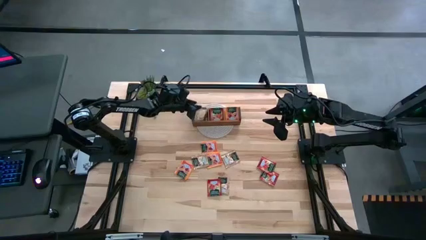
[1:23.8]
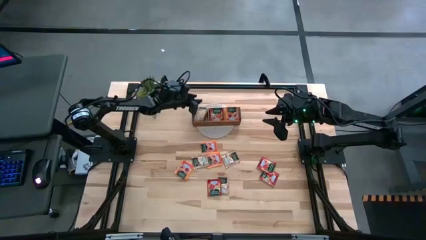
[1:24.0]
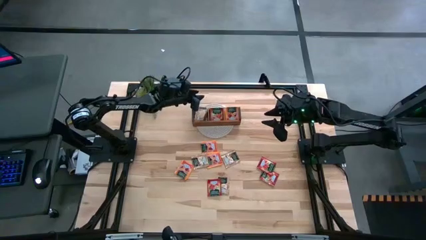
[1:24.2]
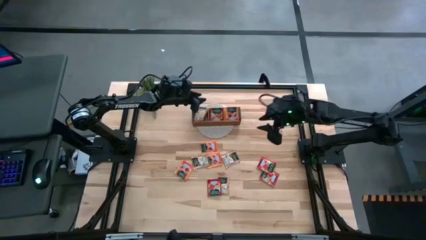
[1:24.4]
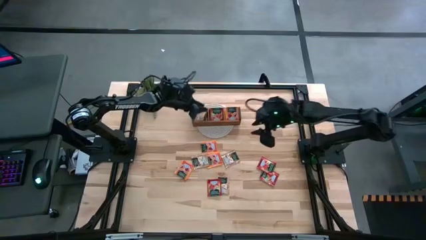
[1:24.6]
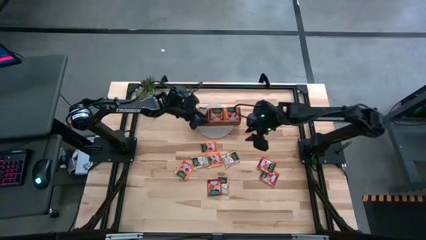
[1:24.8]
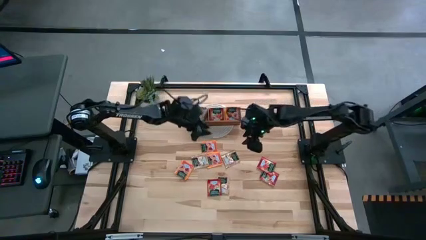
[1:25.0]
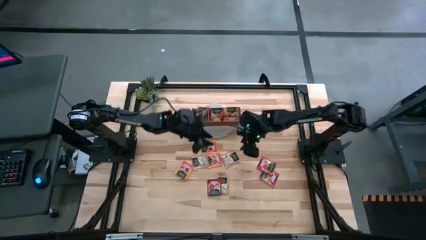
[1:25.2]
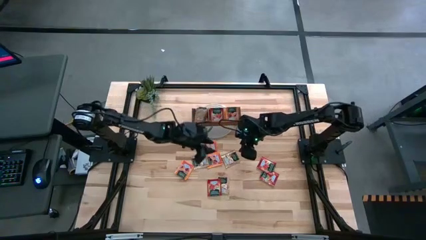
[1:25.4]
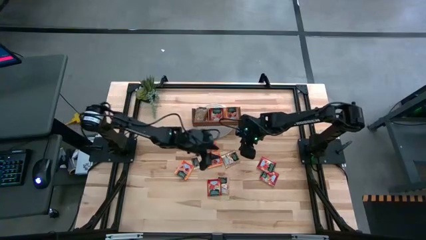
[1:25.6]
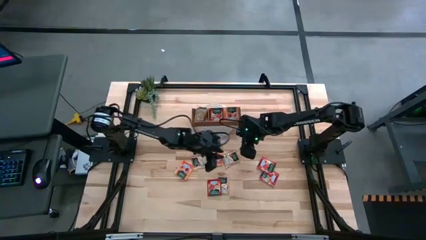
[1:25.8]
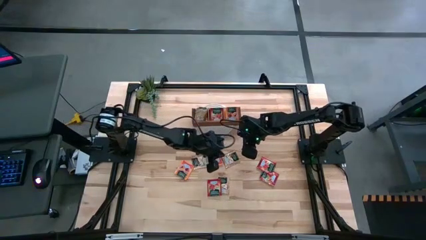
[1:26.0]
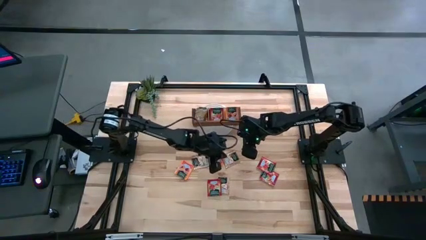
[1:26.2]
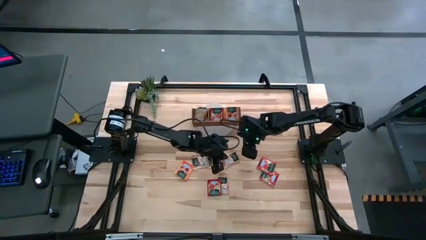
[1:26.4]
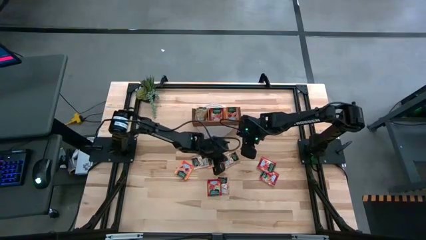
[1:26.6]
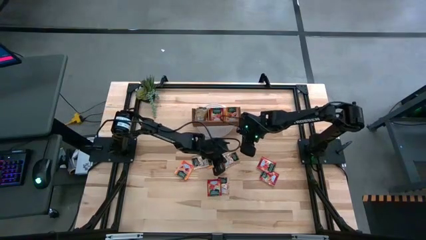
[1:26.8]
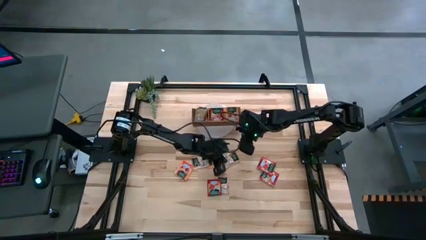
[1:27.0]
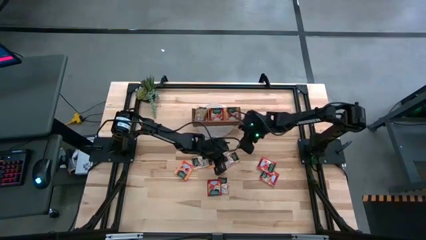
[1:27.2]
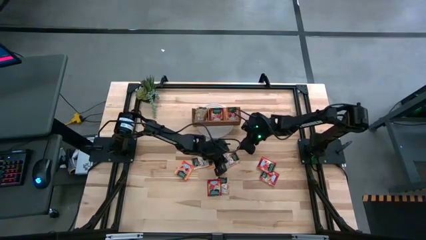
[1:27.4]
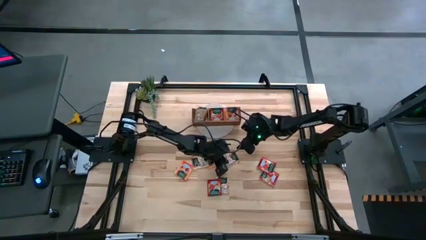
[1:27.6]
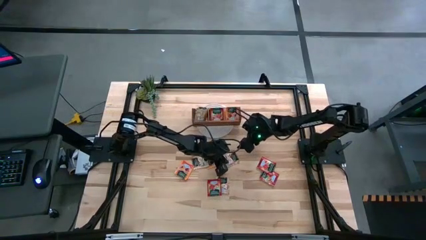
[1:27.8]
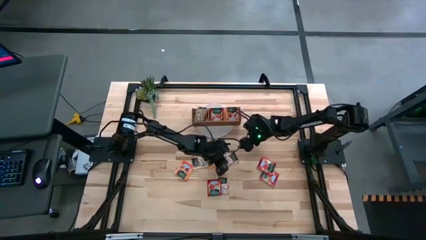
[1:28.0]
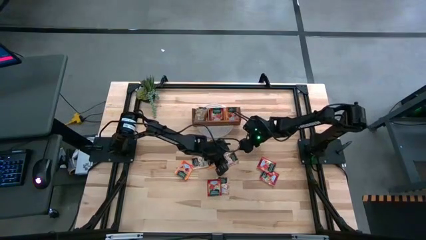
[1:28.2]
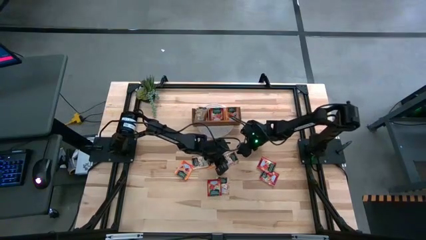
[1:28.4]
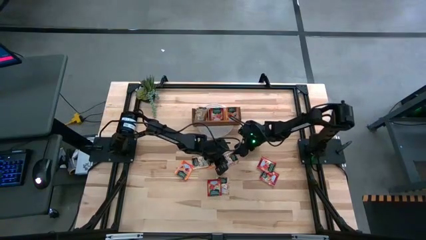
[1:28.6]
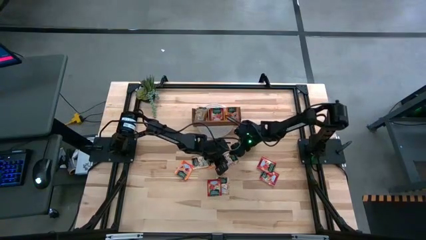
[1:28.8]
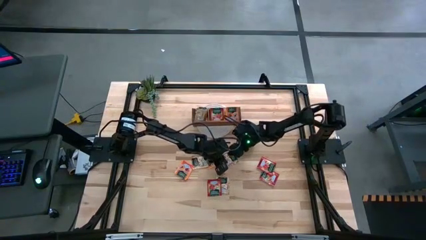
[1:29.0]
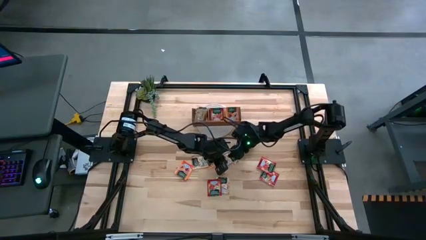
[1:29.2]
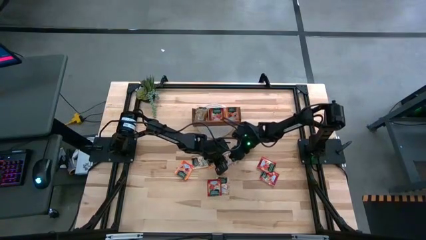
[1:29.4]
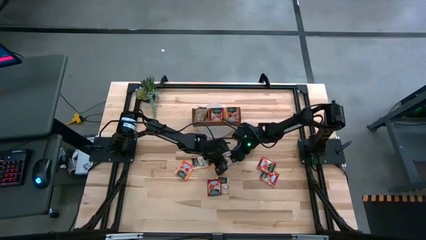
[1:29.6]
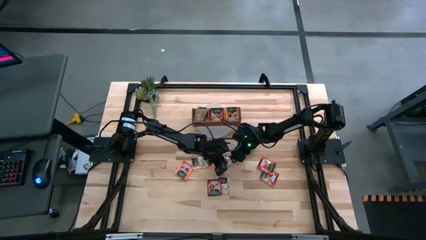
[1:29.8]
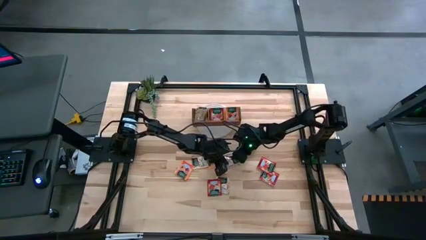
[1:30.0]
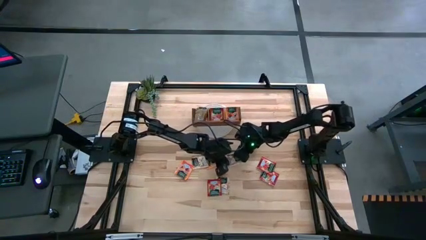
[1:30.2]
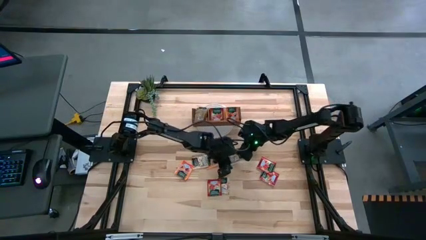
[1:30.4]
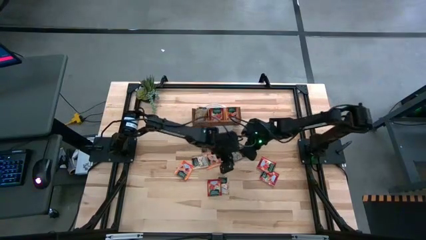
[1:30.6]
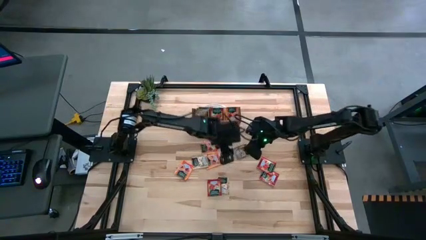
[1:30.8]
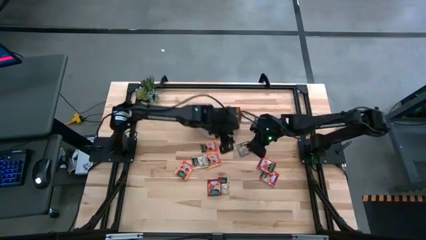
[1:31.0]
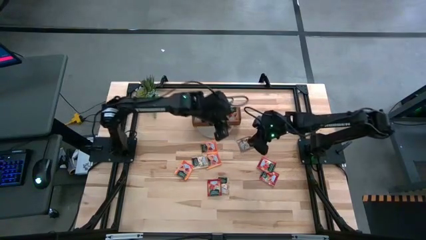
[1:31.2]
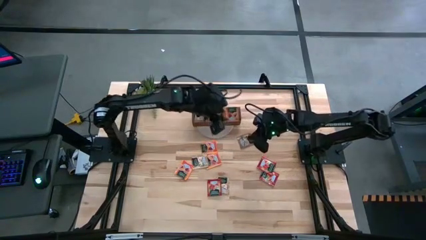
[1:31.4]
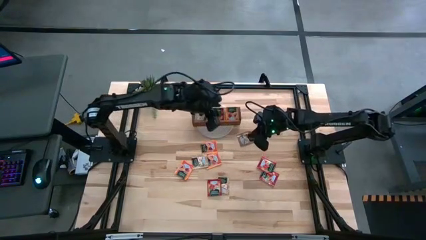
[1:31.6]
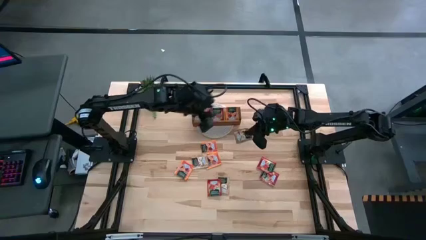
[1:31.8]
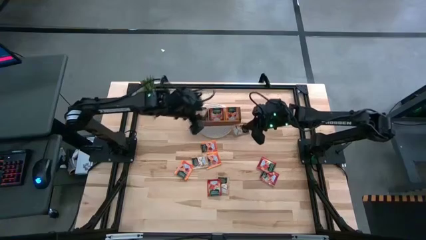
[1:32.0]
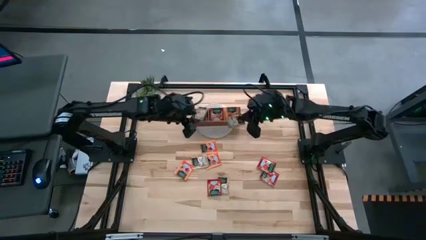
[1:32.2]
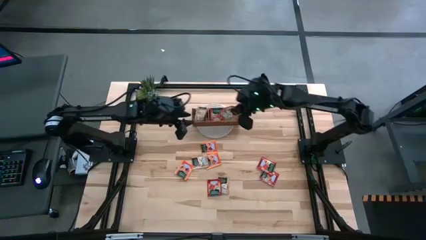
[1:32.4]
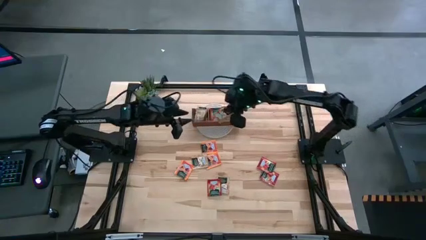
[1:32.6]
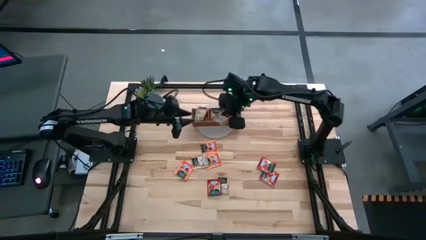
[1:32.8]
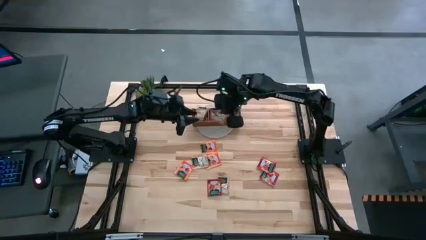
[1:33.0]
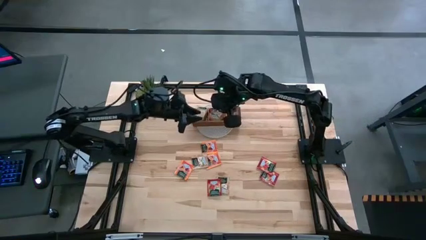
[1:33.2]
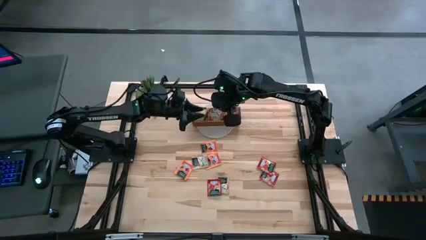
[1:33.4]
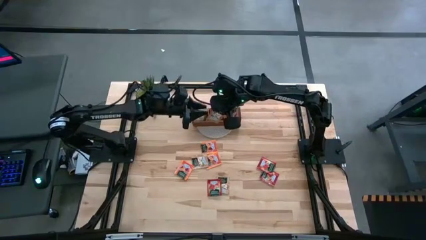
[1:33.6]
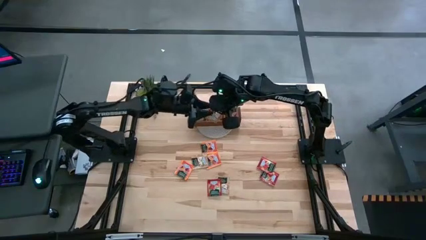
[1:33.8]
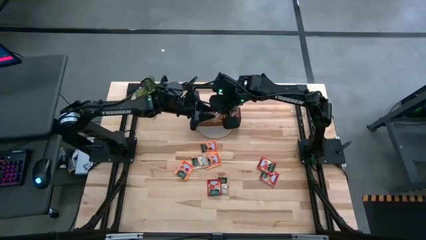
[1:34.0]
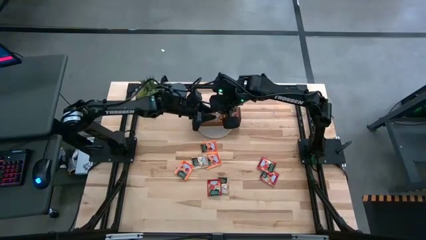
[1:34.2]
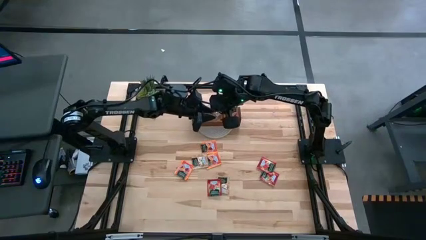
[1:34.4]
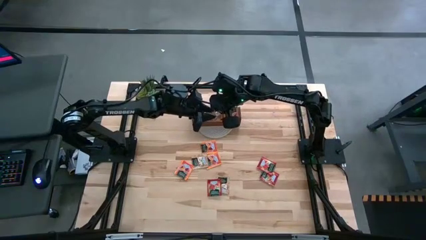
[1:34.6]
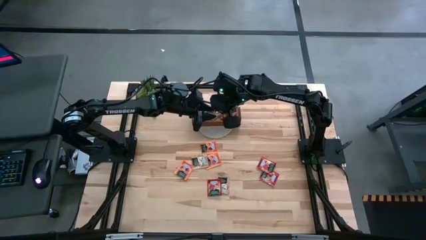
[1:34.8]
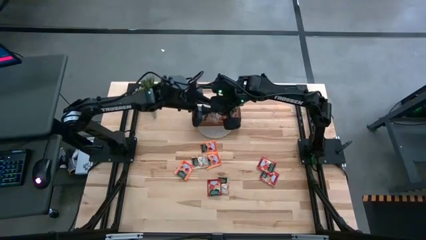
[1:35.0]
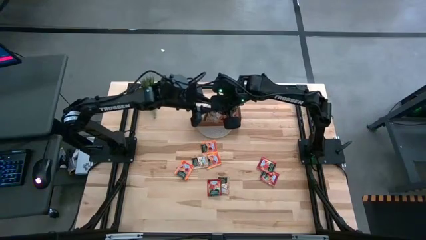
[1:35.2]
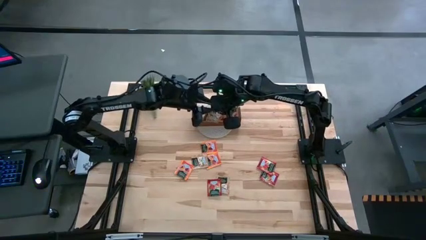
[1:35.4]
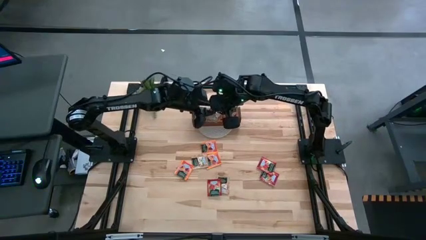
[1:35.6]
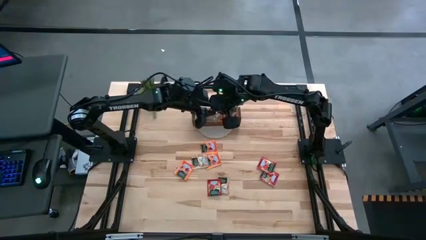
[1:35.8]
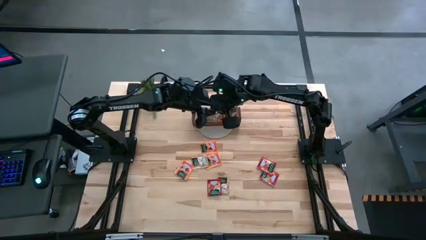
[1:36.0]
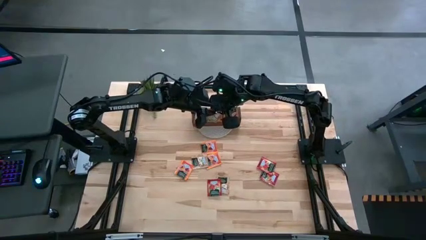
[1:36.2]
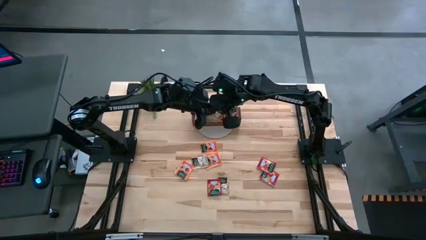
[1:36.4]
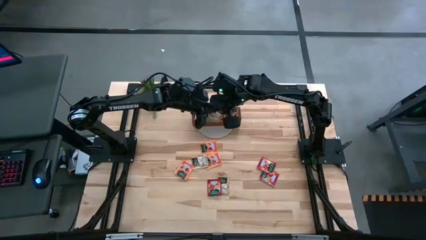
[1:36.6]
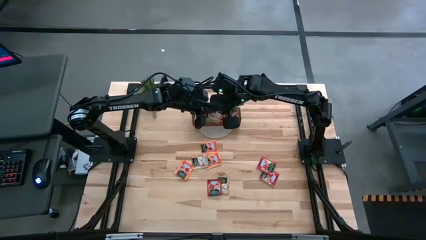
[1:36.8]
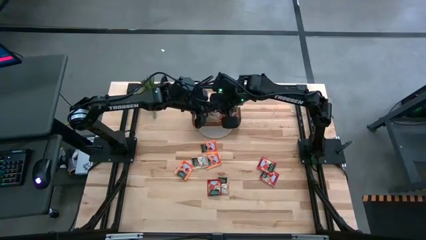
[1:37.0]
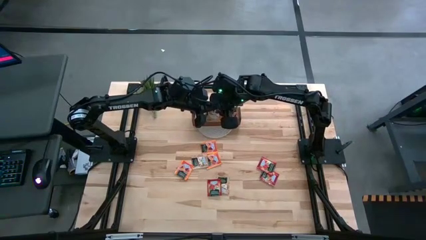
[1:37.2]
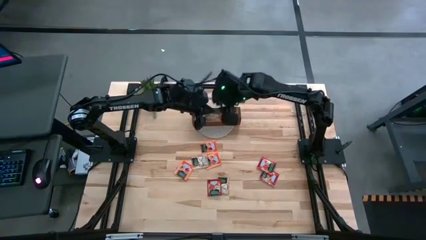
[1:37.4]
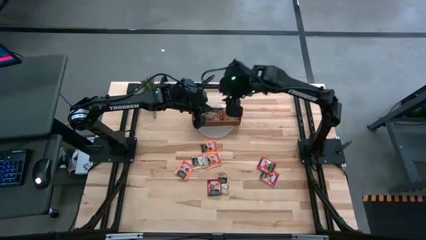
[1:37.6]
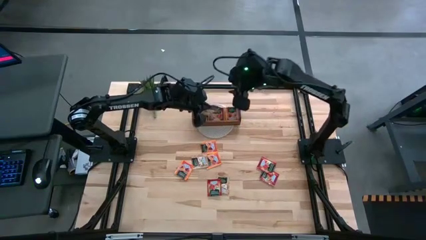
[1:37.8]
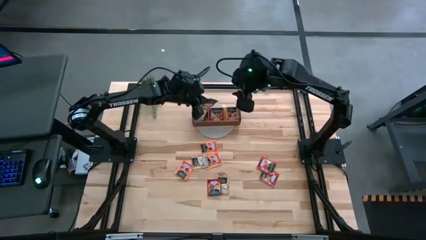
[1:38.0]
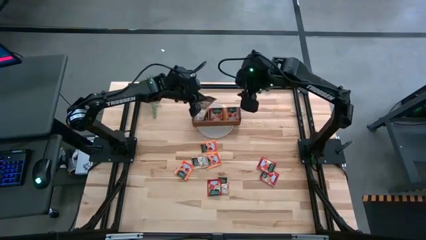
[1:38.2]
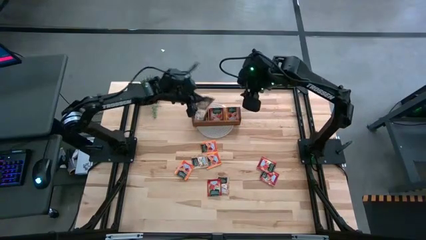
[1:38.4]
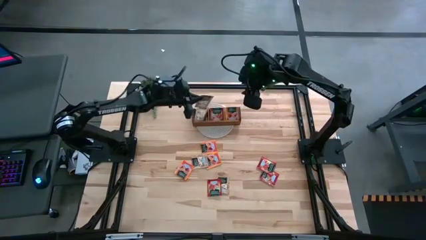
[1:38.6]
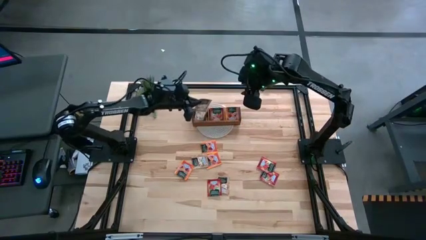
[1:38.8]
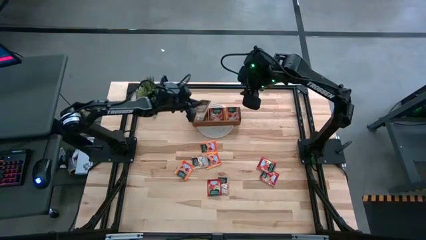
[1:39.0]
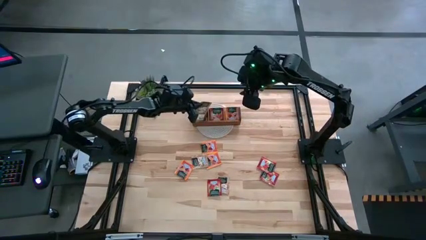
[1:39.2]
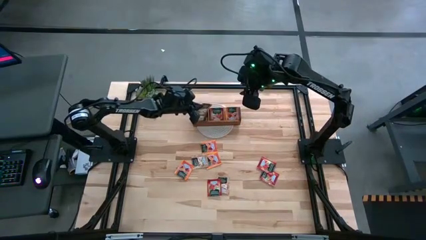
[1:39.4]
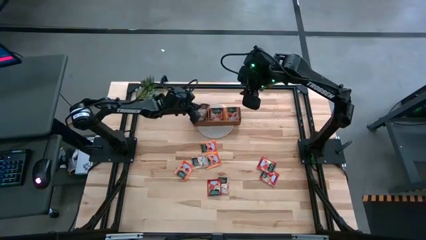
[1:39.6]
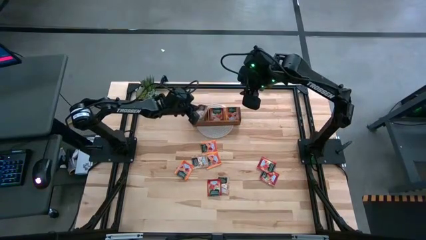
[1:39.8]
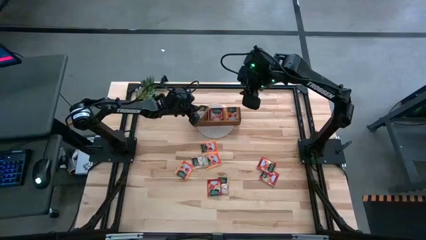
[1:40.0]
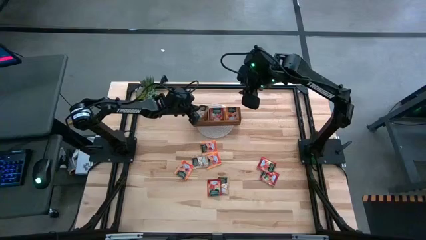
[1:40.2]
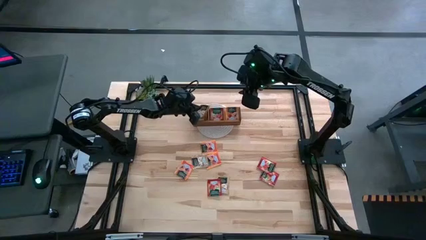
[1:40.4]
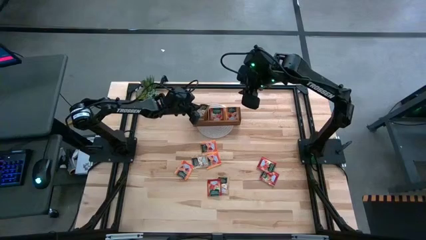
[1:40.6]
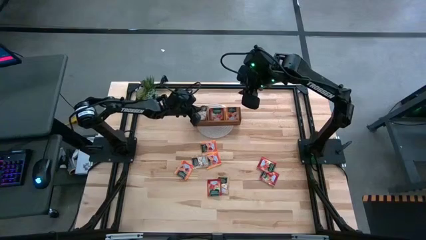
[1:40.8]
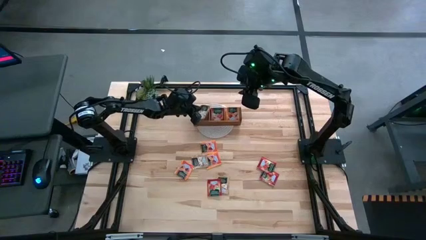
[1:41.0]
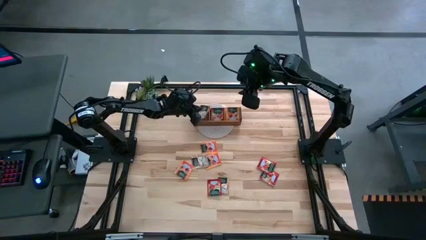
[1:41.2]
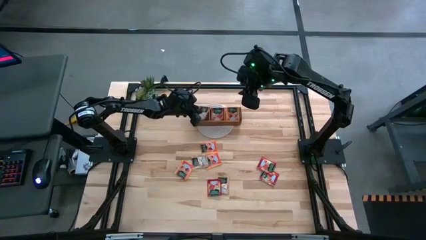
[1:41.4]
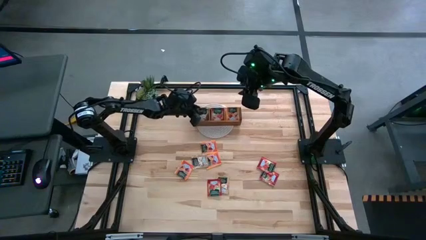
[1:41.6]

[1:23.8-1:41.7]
Task: Pick & Place Tea
Put the brown tea bag in the left section of the wooden organizer
